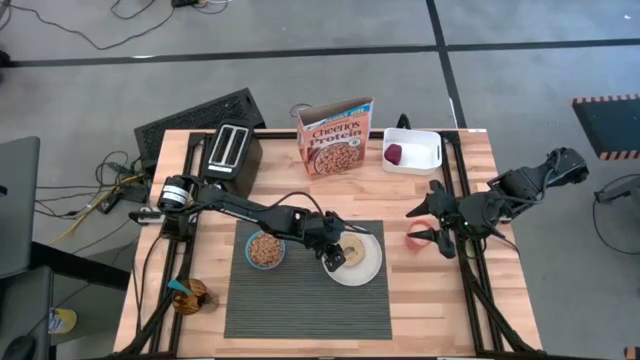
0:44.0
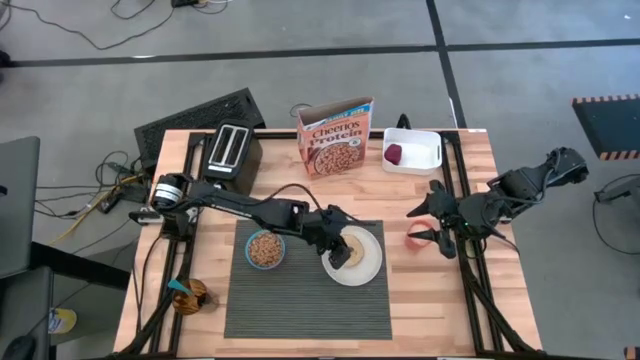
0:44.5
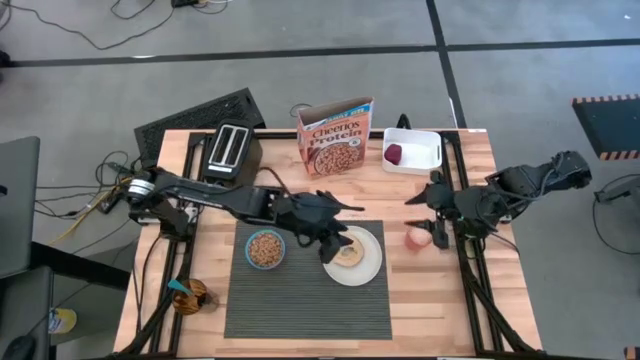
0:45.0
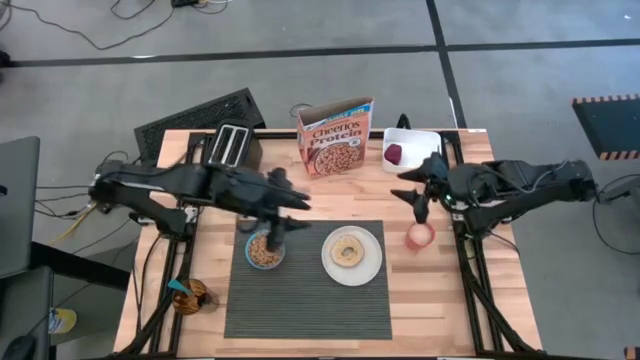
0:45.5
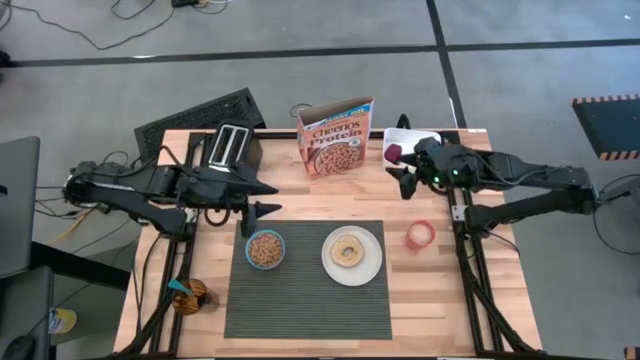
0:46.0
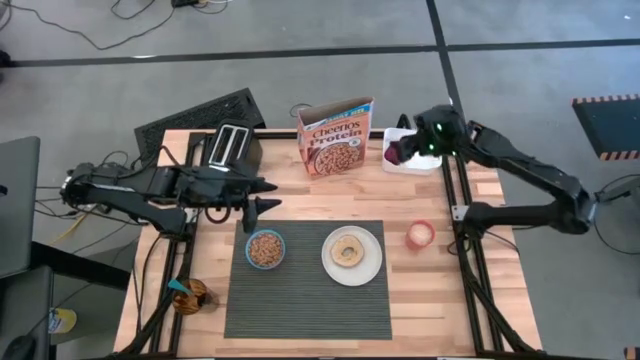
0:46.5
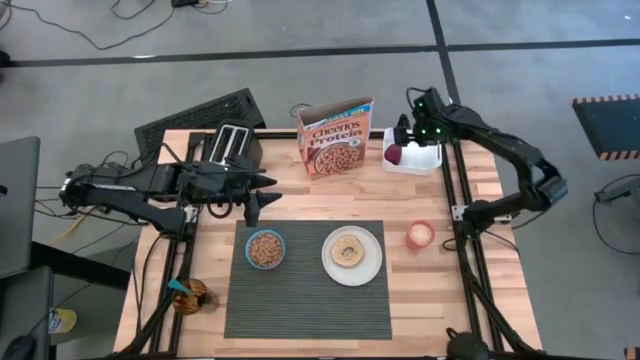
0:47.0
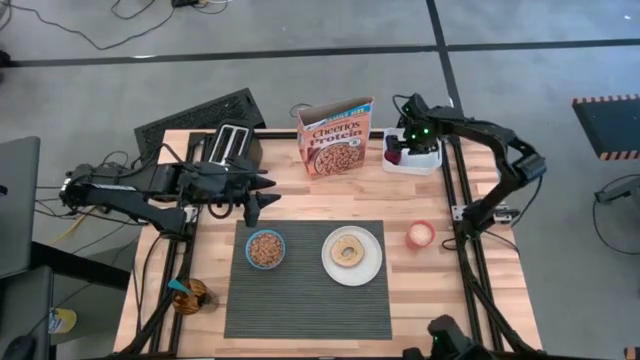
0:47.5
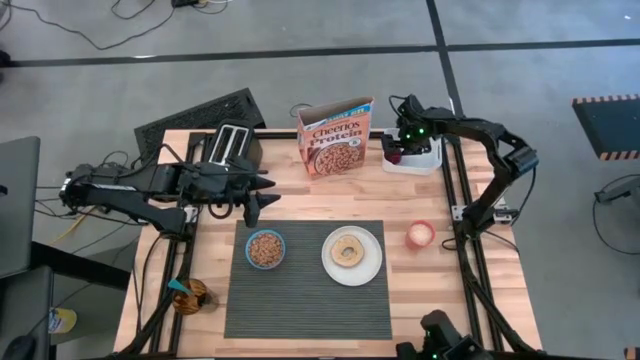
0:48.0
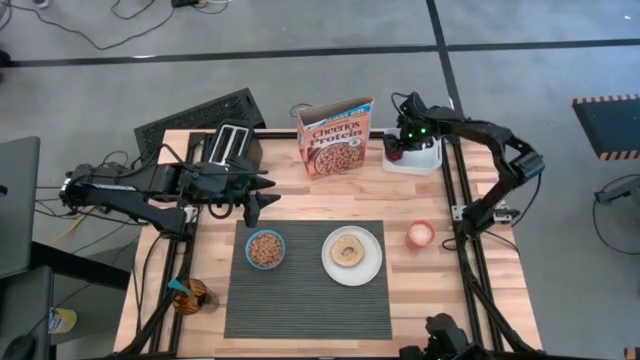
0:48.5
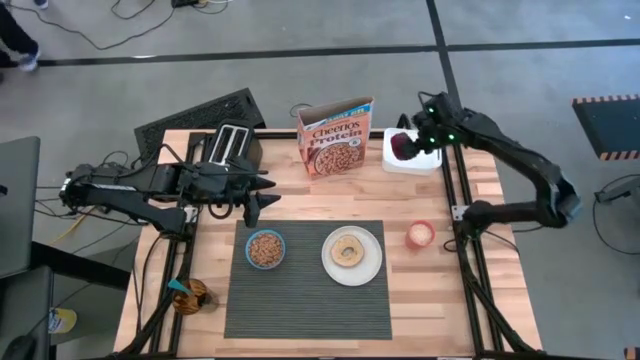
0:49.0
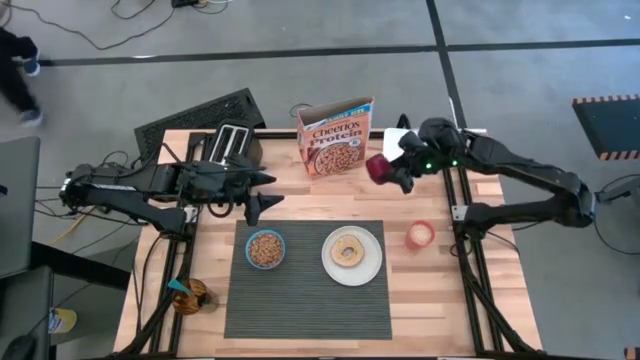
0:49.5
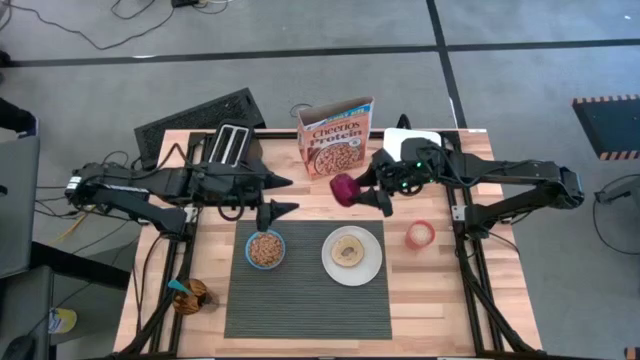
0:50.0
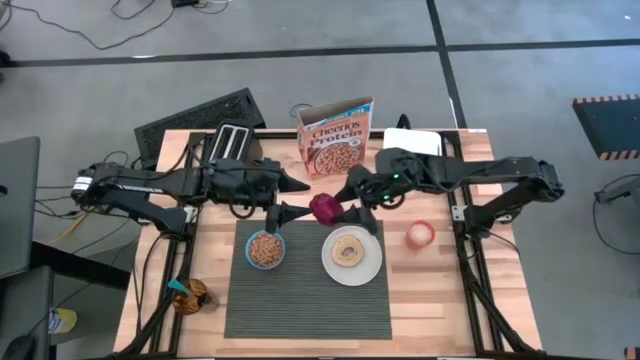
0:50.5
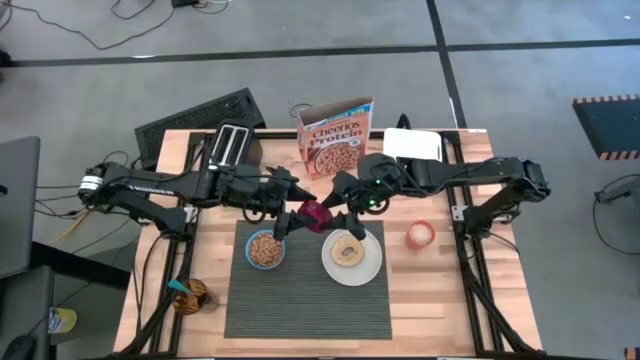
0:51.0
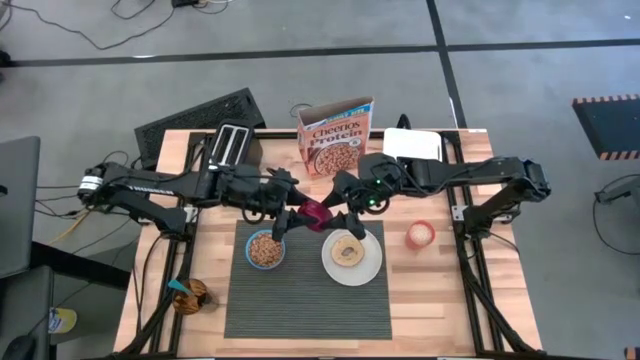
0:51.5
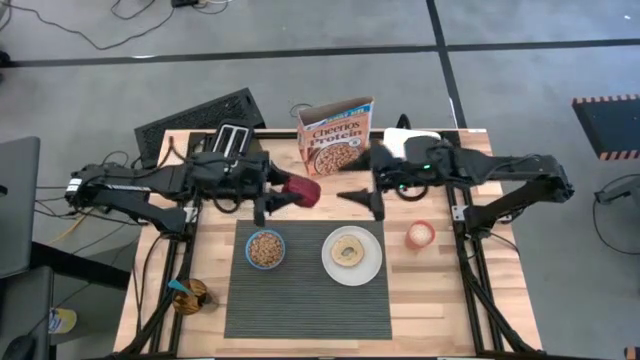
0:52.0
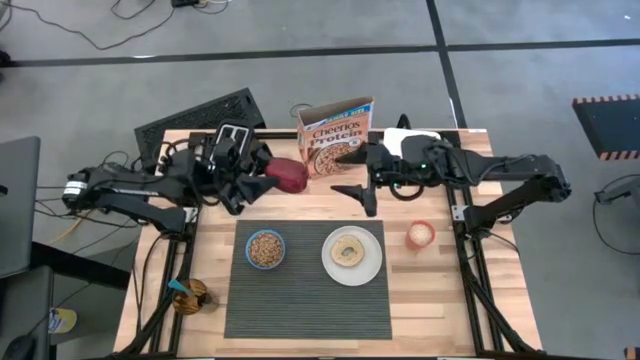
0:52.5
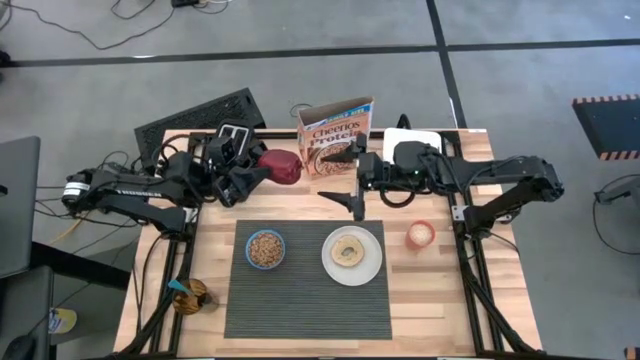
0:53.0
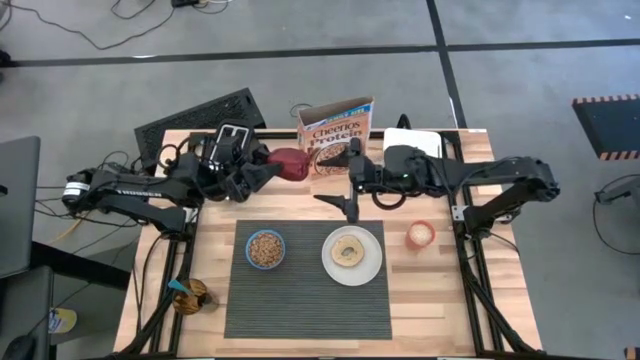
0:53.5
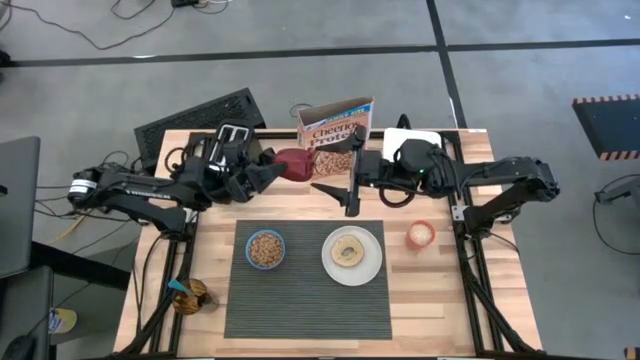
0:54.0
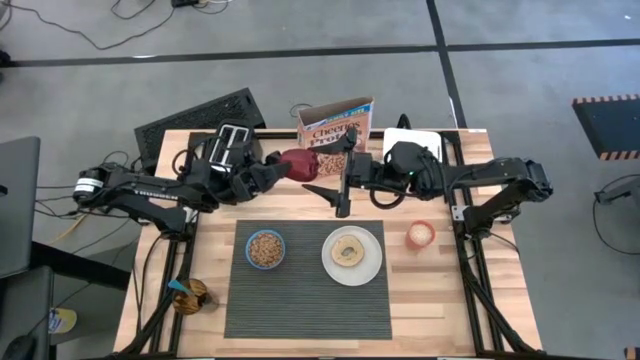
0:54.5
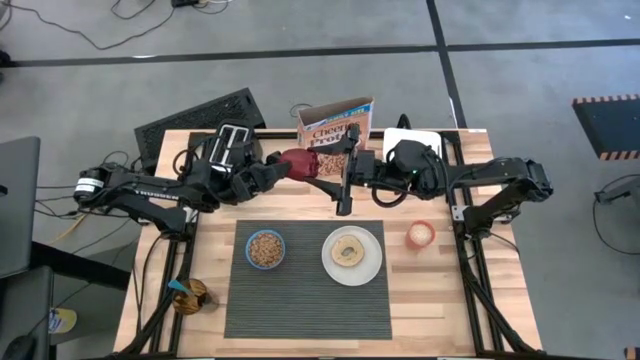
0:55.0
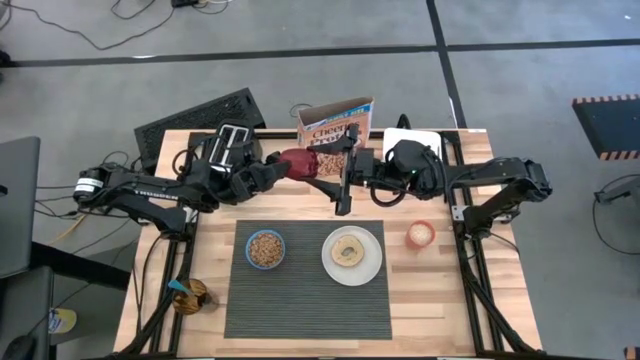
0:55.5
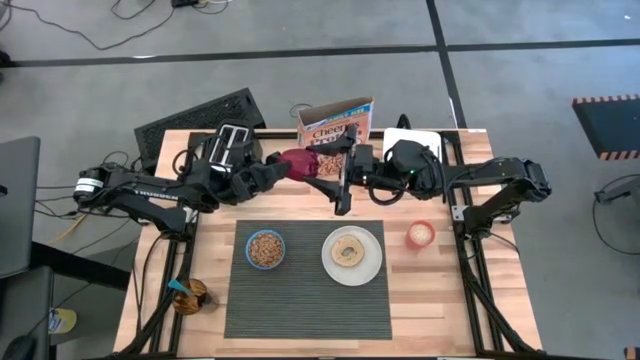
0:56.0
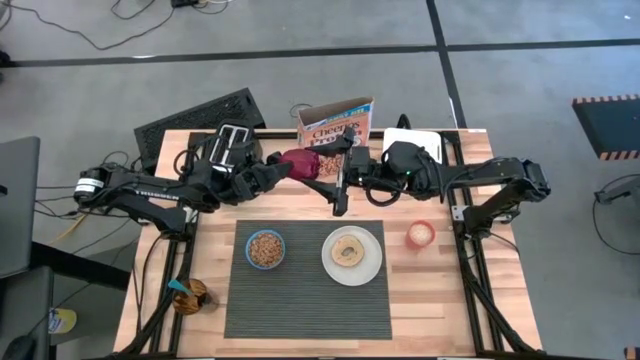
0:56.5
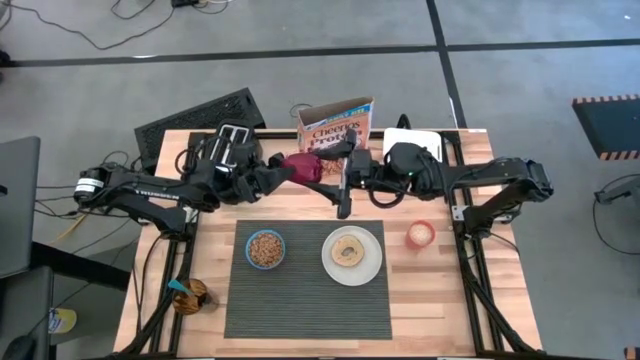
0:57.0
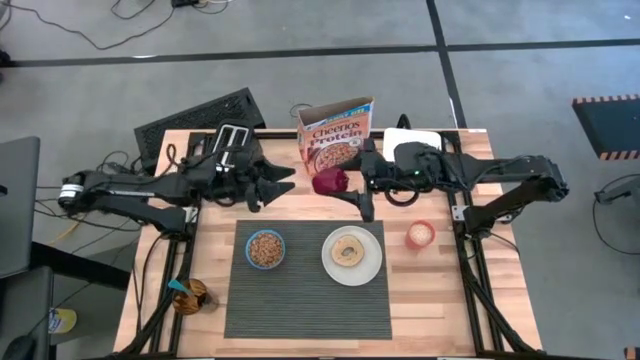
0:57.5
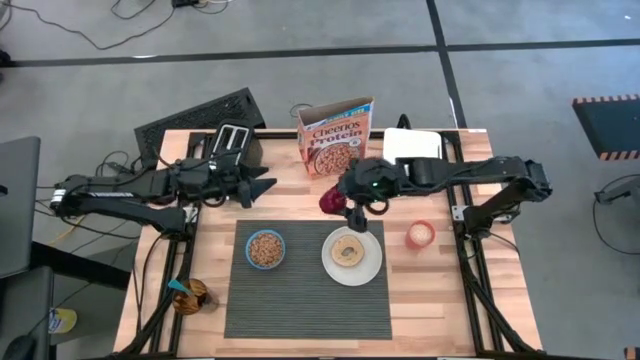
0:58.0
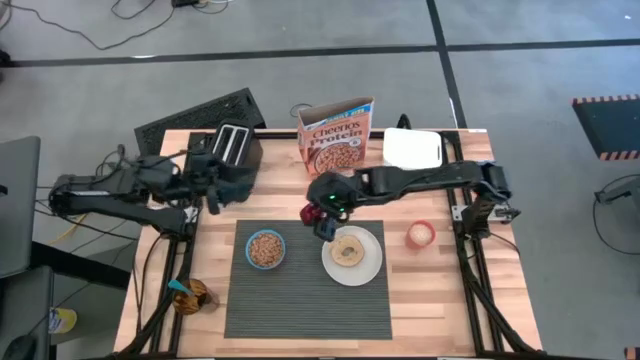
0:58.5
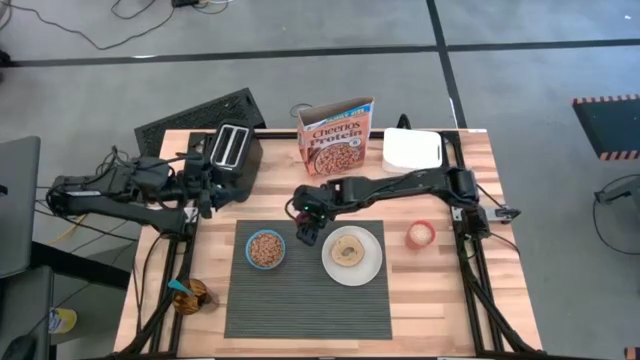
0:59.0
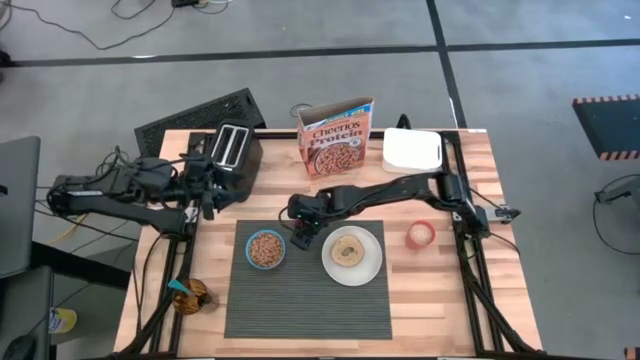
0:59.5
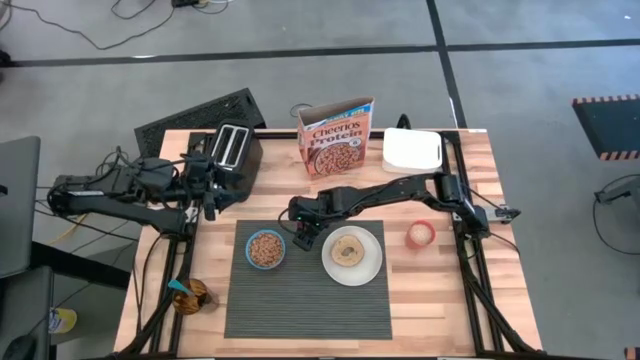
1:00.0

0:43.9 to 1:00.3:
Task: Arrange a breakfast setting
Put the apple on the gray placemat

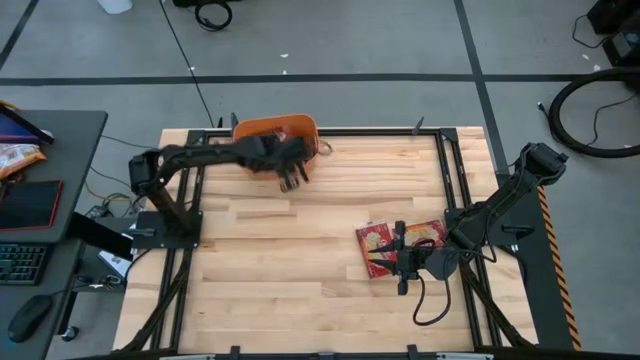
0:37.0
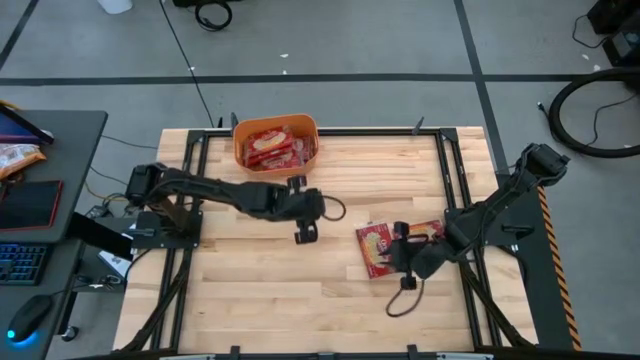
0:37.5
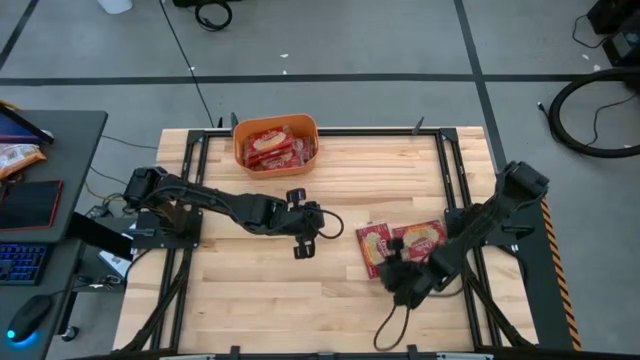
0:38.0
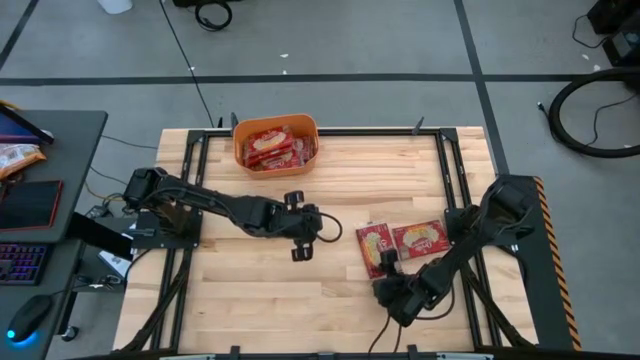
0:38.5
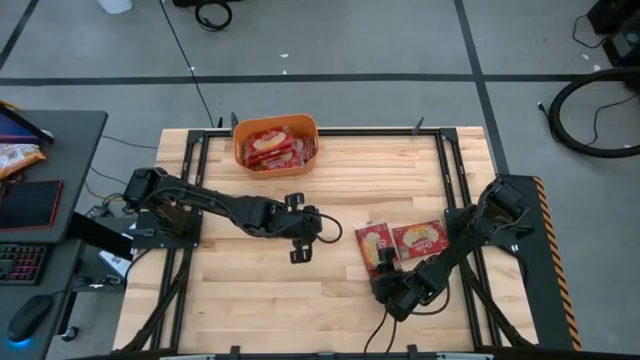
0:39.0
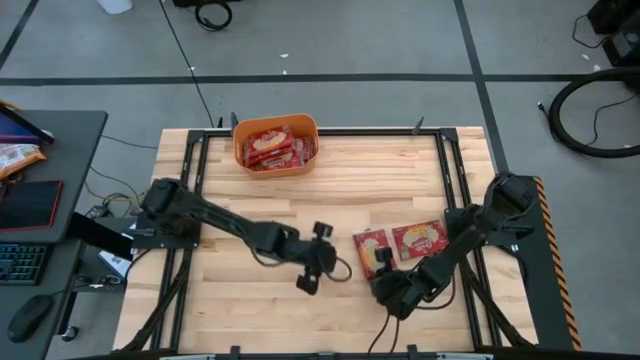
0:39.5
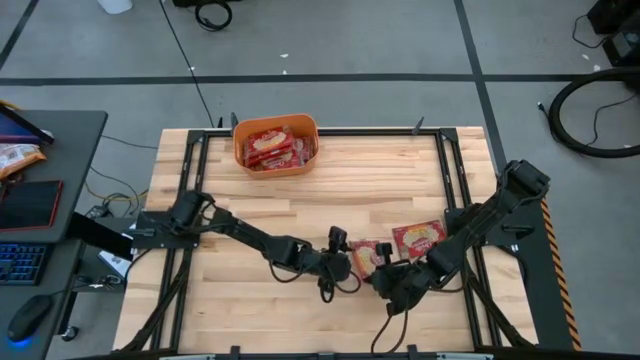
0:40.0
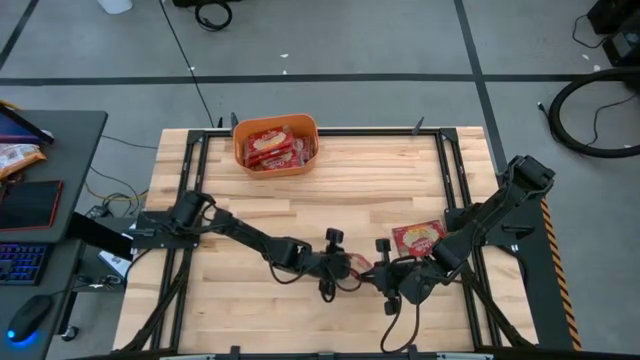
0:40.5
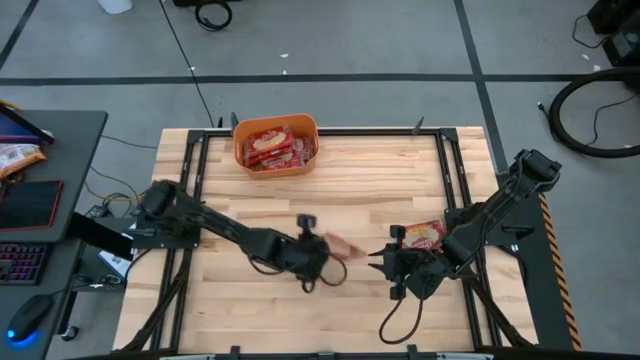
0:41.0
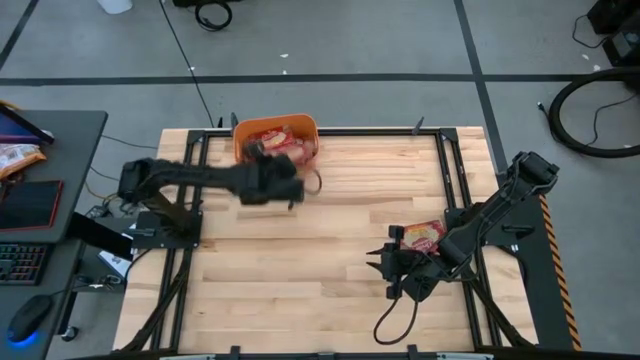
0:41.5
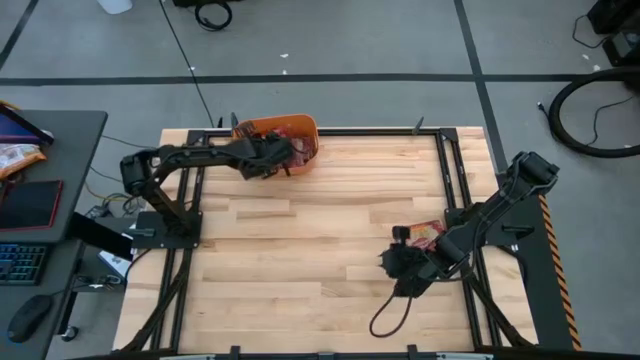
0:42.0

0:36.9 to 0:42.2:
Task: Sort popcorn bags into baskets
Put the red popcorn bag into the orange bin
